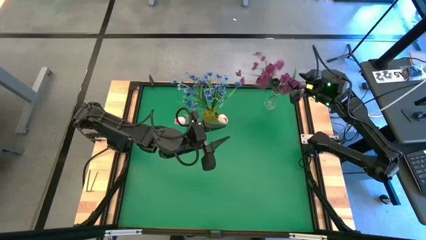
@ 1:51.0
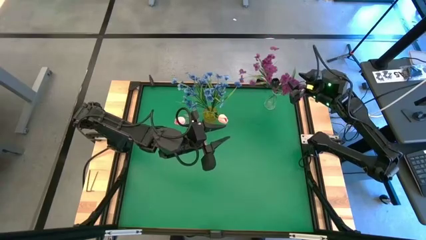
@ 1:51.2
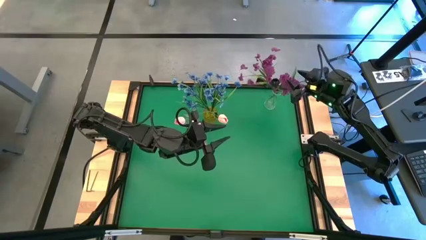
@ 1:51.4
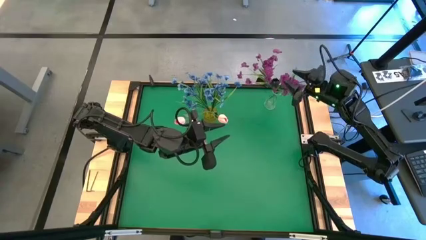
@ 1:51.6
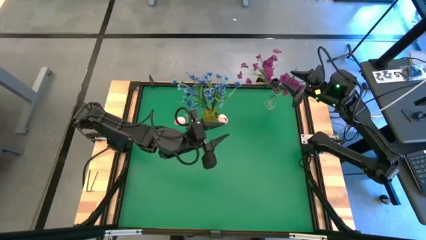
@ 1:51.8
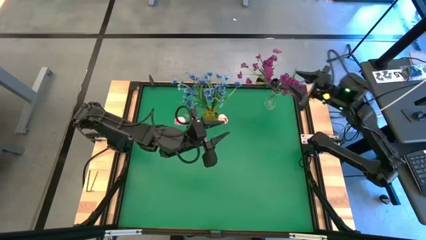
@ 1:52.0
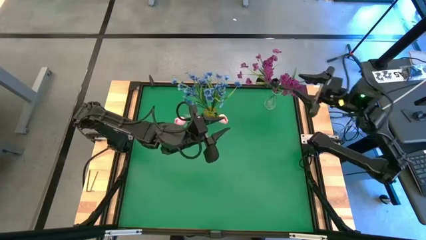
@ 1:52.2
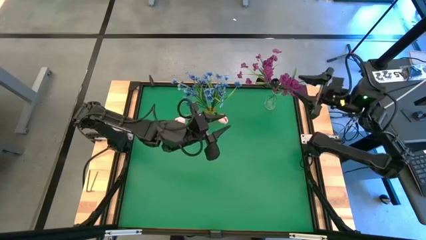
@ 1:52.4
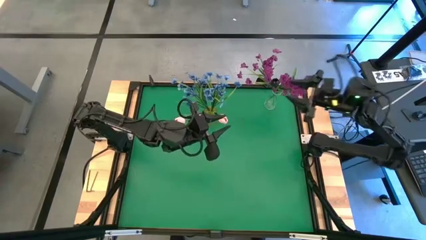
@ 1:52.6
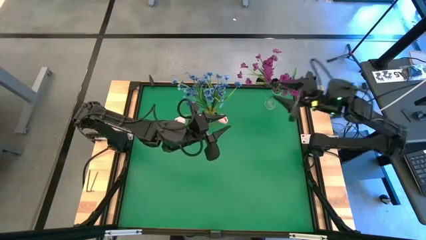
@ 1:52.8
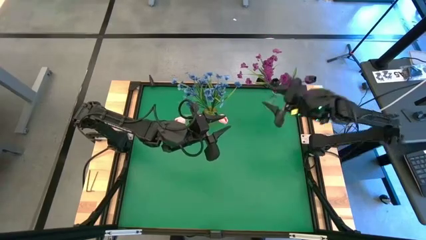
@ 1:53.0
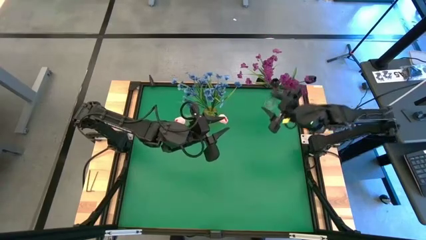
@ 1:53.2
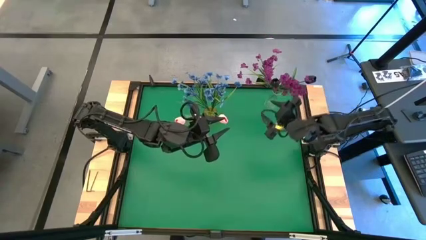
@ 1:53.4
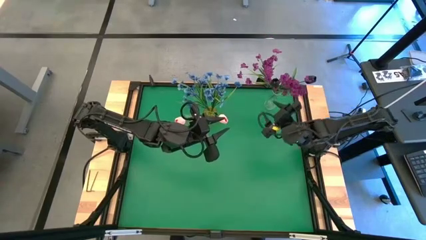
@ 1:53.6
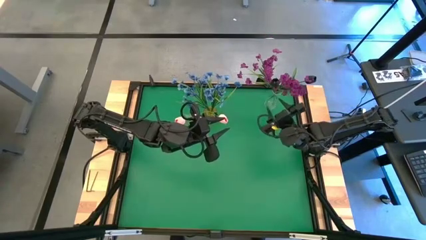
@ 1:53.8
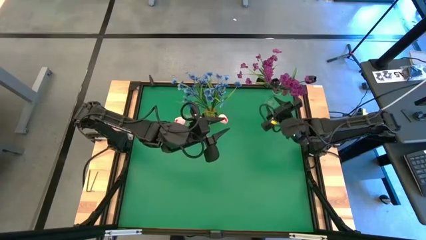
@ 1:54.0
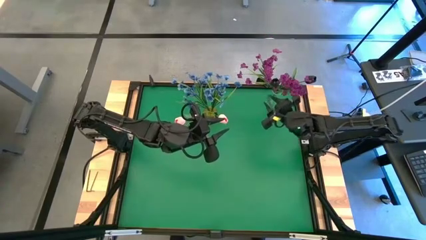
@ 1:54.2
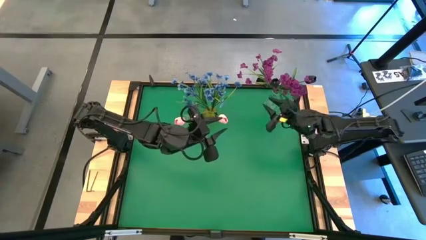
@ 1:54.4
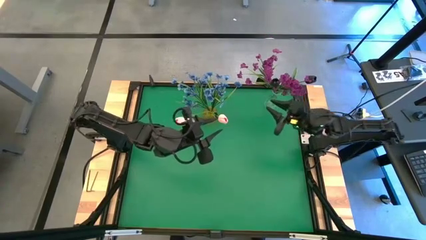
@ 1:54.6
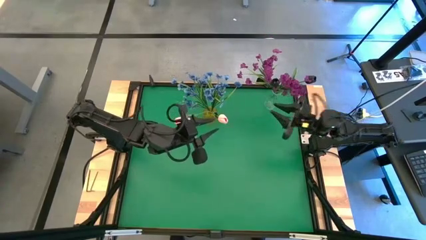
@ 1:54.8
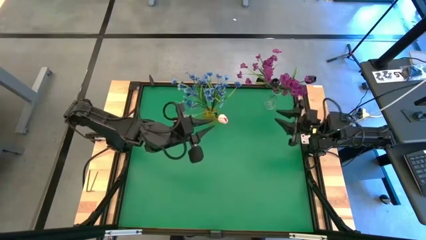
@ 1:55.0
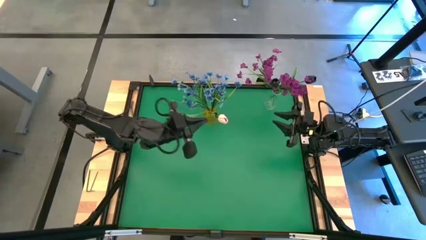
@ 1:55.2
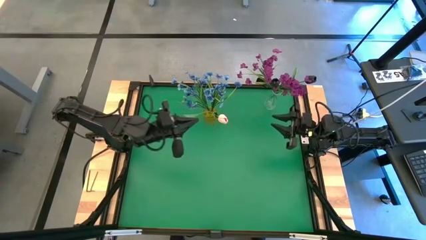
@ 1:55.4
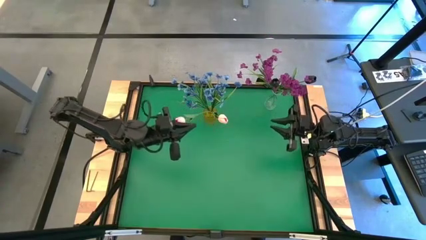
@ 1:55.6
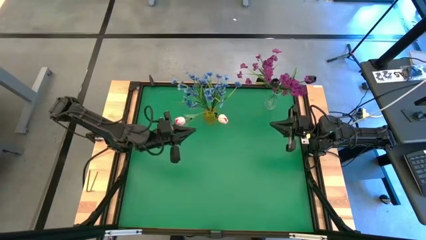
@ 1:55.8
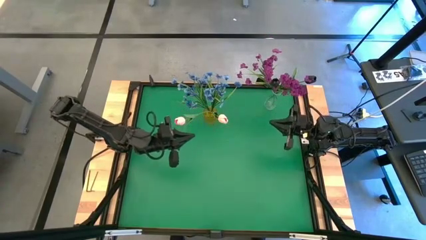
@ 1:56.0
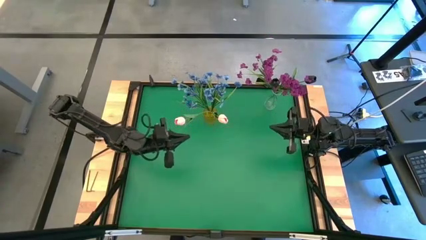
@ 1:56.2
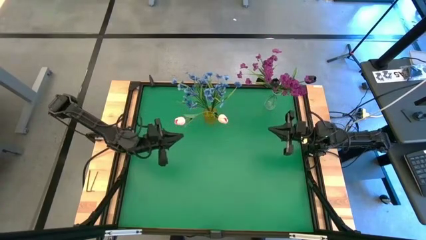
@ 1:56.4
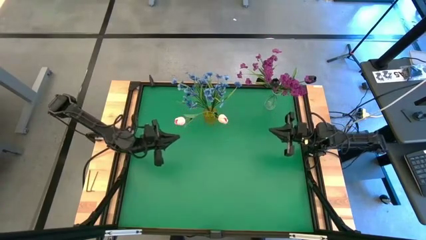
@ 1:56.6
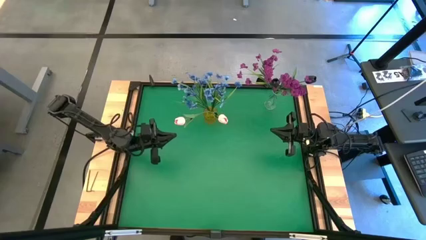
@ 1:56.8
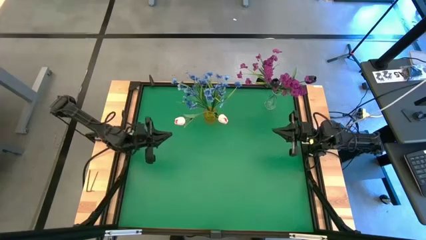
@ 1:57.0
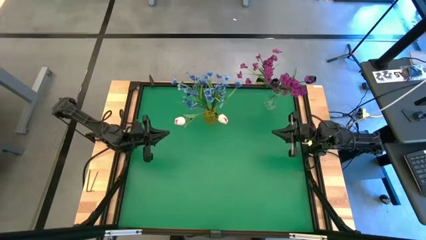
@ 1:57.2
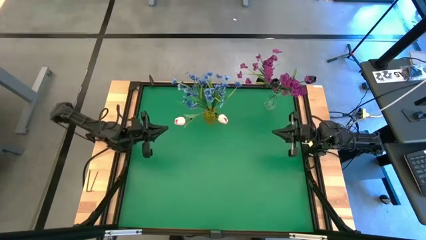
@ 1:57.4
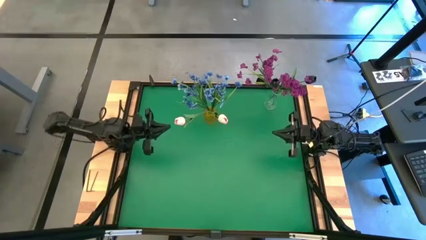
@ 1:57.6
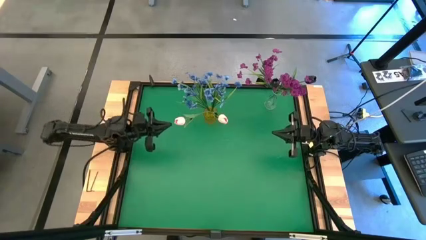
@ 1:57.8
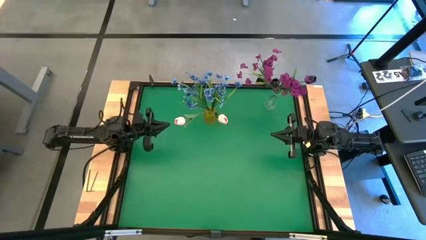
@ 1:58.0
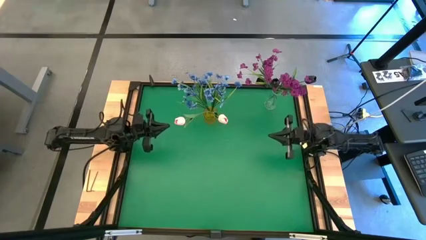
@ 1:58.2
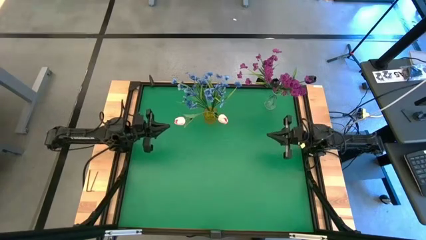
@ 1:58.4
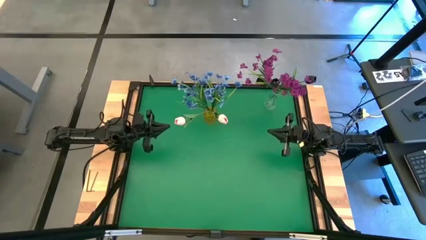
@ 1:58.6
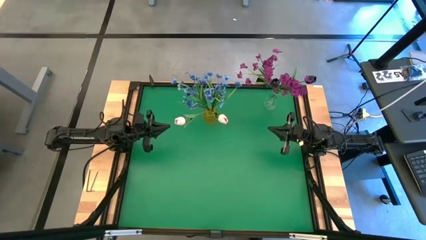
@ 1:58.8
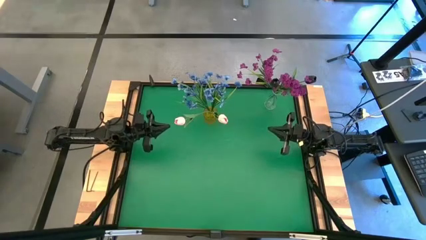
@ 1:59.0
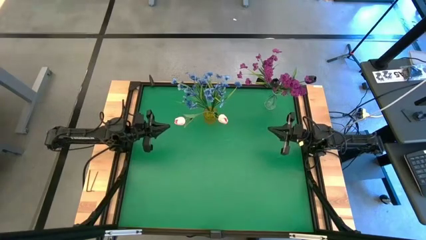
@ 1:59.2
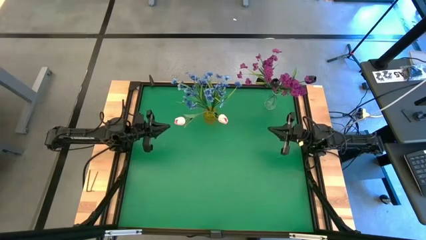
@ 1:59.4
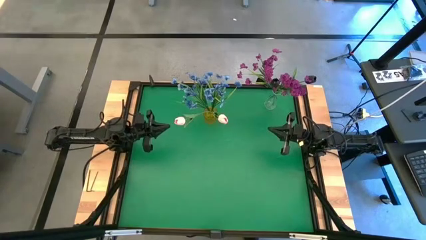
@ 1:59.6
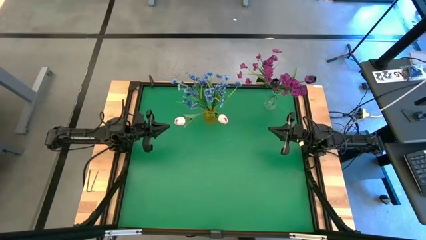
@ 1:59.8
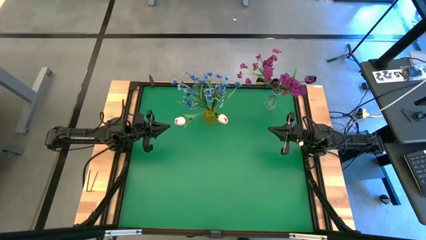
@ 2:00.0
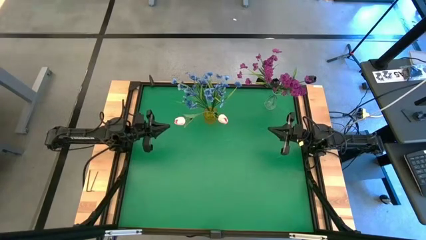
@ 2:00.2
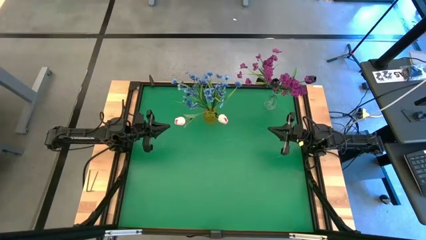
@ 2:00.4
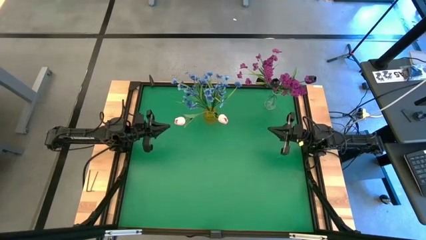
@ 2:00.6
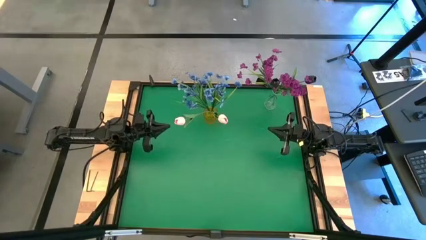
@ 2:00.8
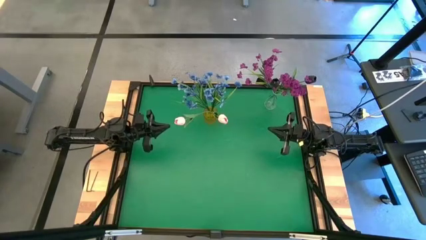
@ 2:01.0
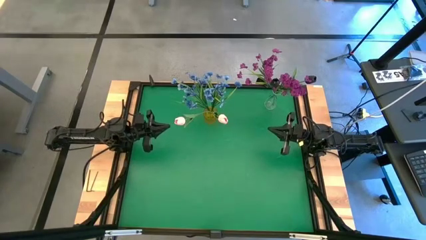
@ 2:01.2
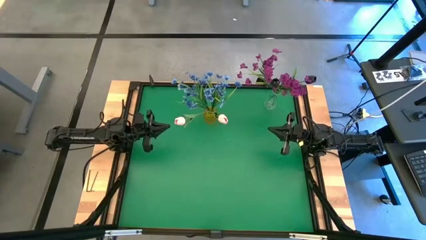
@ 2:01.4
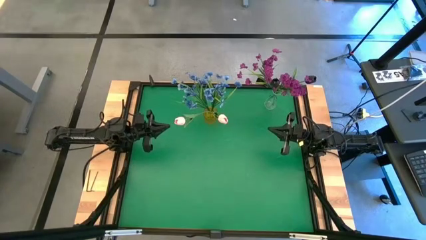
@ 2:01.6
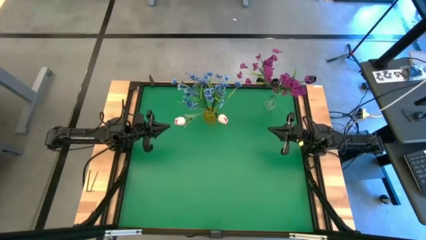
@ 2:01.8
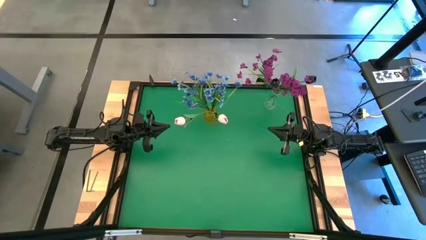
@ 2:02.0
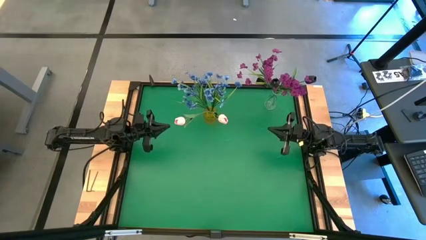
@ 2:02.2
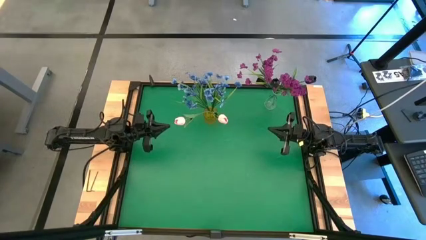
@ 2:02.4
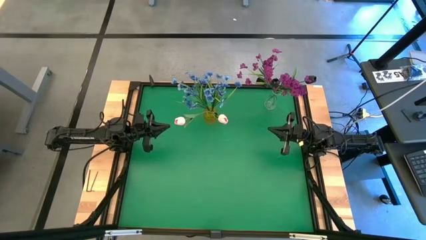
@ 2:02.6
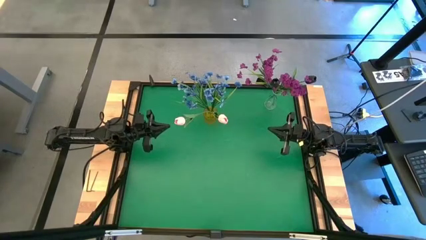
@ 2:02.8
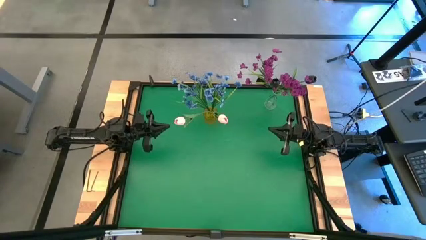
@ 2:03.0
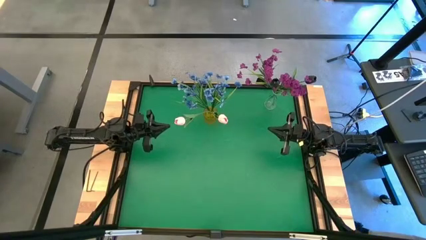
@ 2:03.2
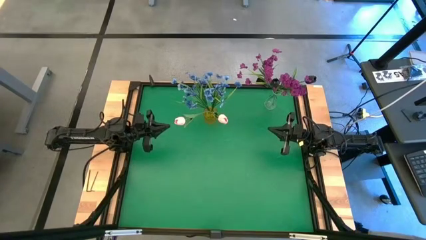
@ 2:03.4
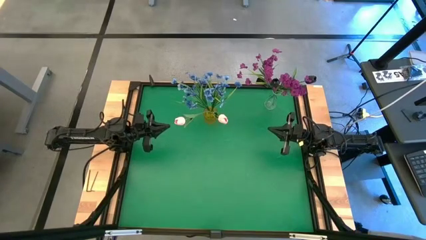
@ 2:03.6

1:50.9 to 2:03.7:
Task: Sort flowers into vase by color
Return to Home Position
